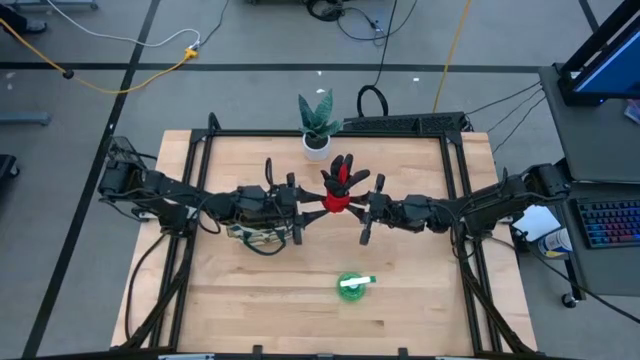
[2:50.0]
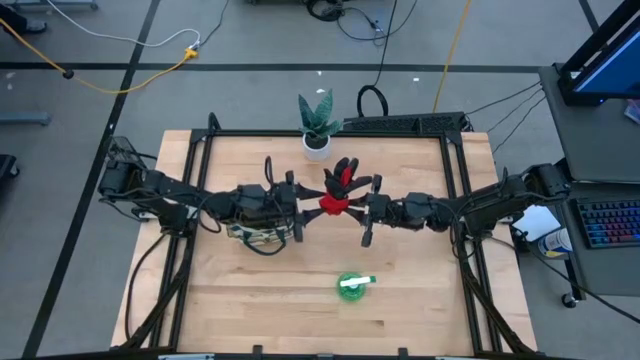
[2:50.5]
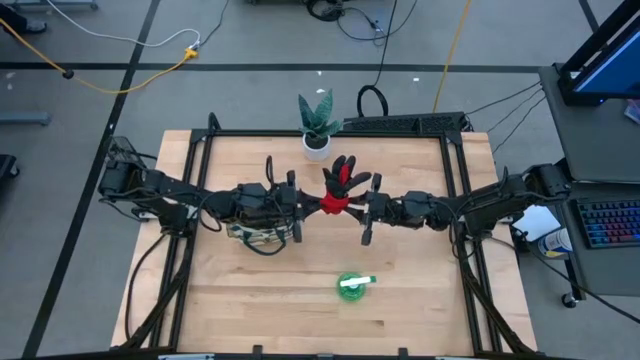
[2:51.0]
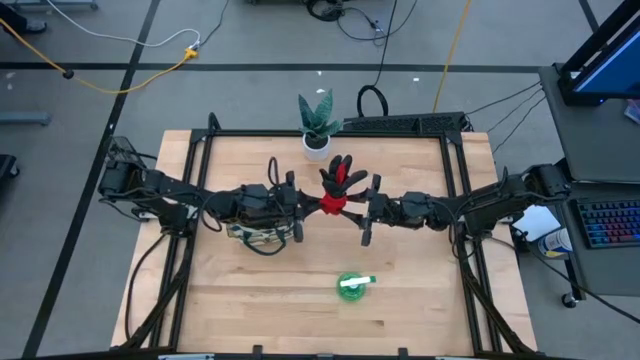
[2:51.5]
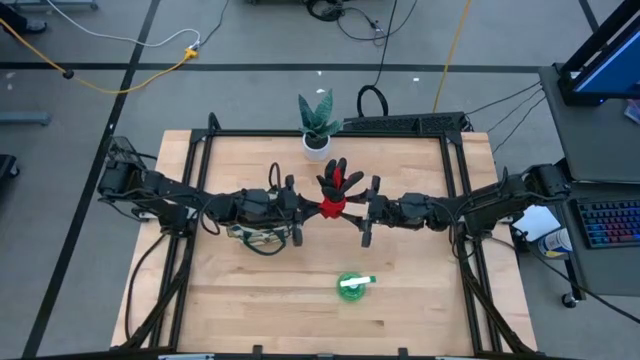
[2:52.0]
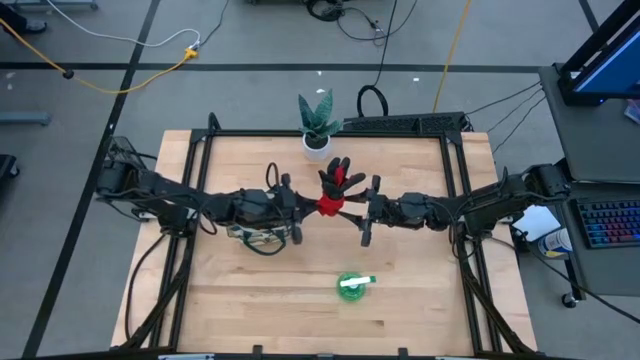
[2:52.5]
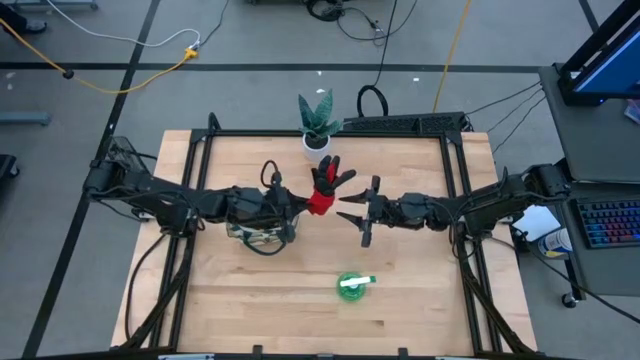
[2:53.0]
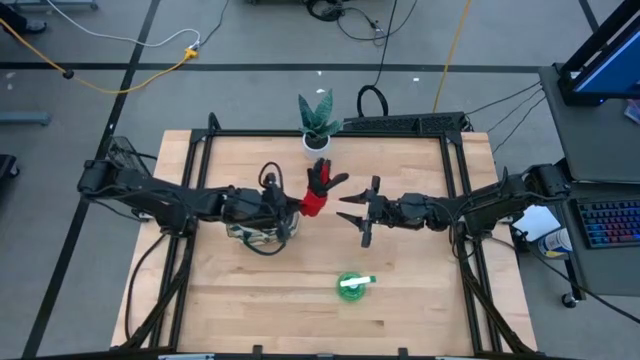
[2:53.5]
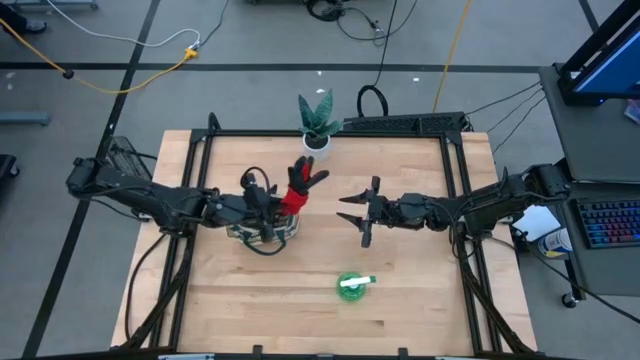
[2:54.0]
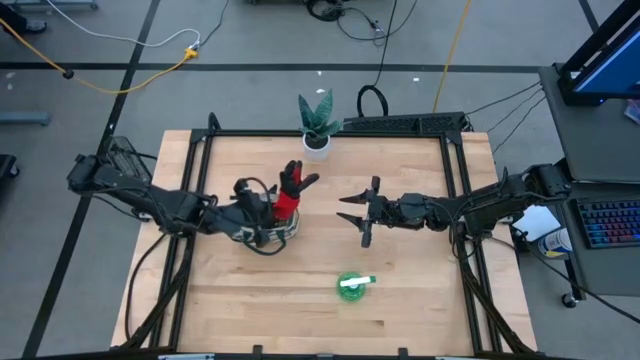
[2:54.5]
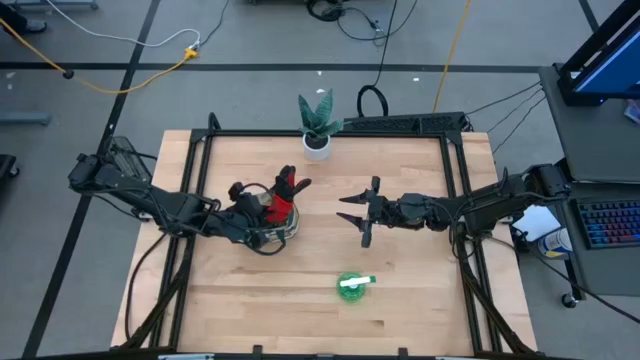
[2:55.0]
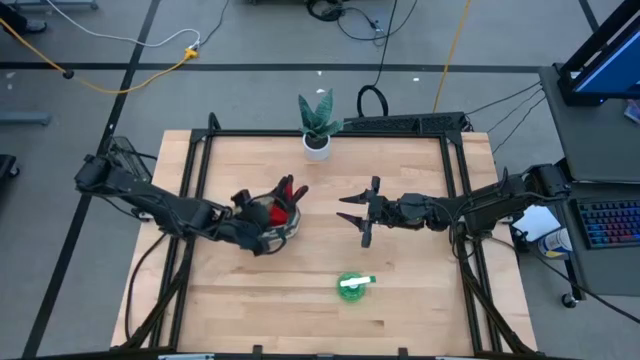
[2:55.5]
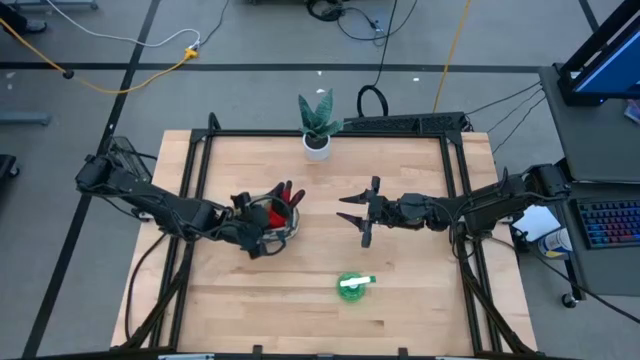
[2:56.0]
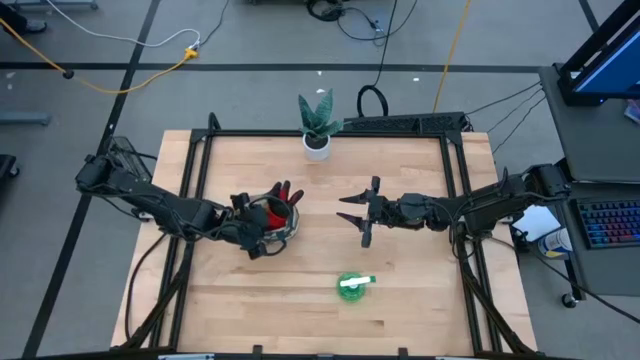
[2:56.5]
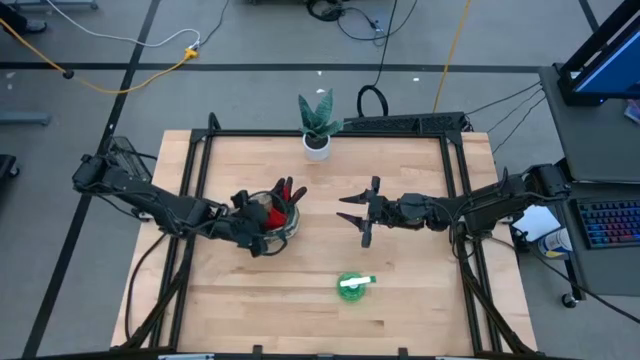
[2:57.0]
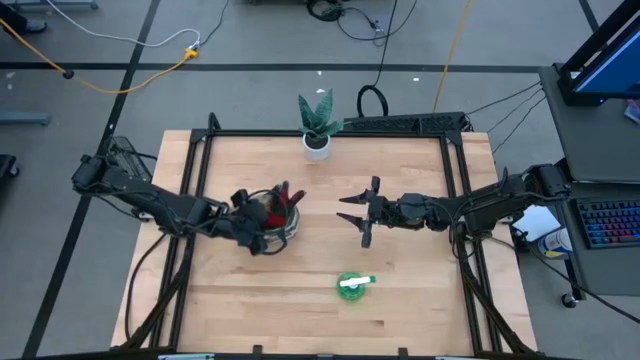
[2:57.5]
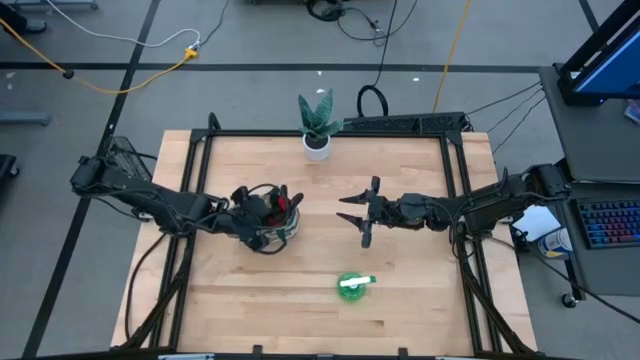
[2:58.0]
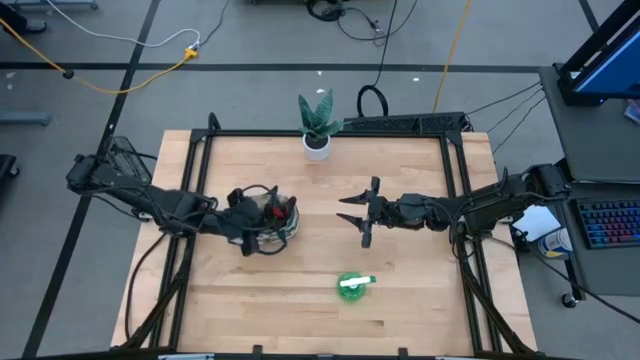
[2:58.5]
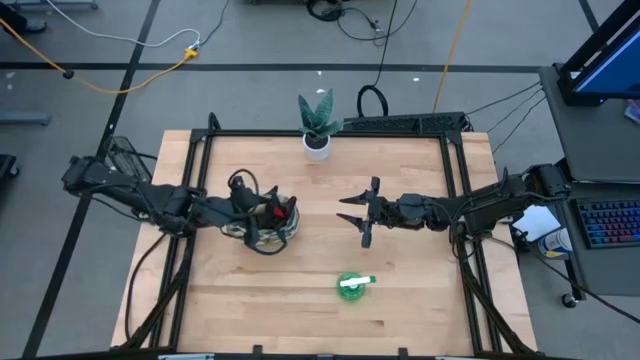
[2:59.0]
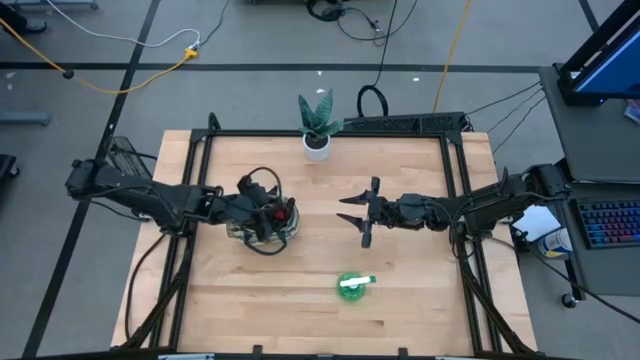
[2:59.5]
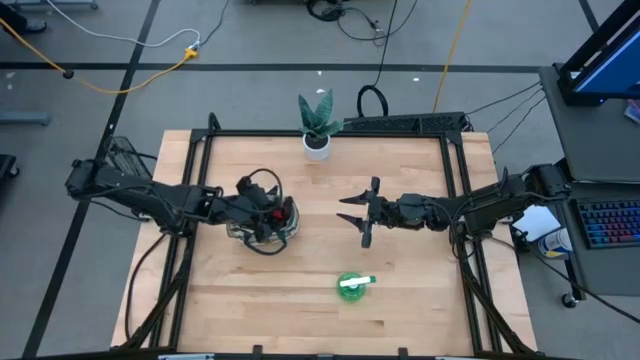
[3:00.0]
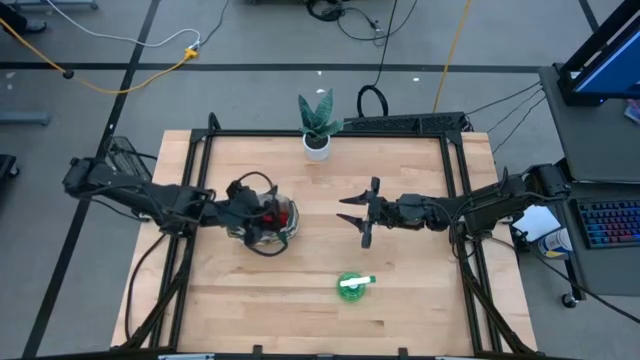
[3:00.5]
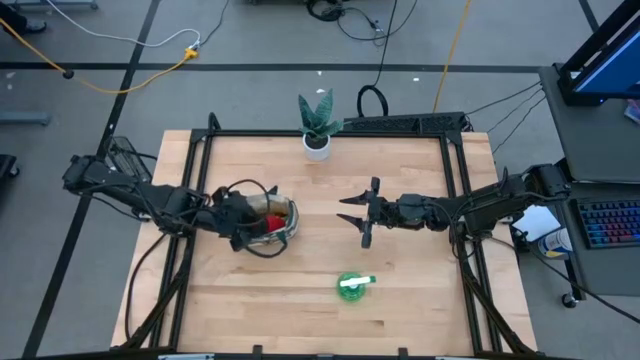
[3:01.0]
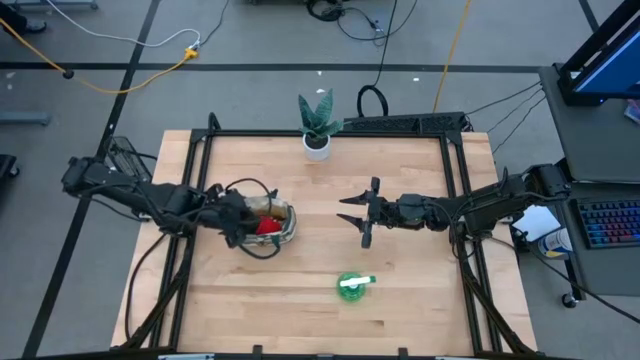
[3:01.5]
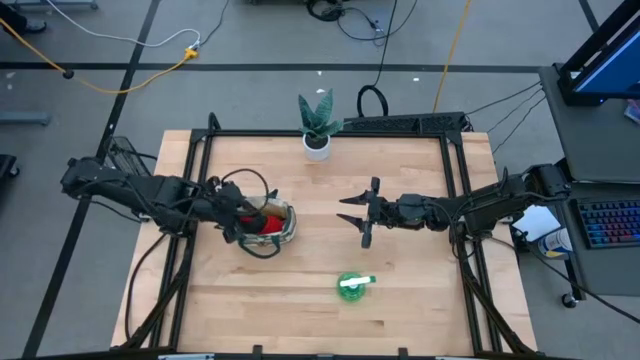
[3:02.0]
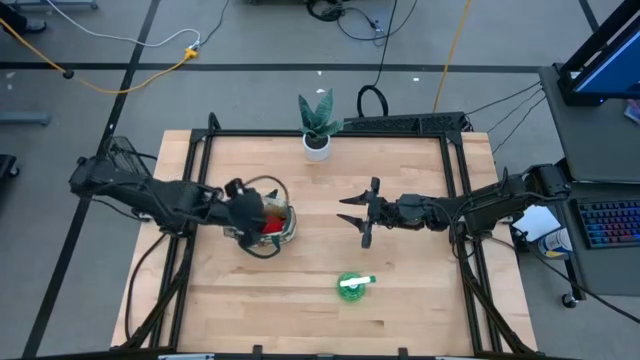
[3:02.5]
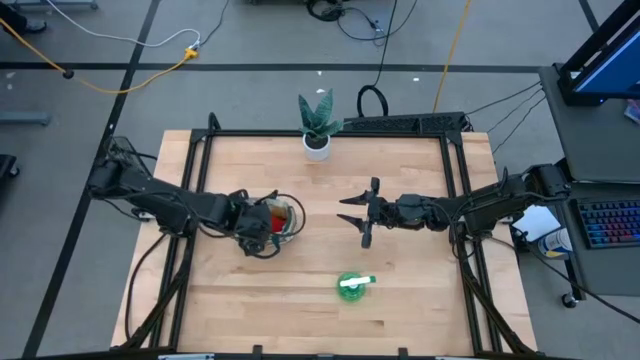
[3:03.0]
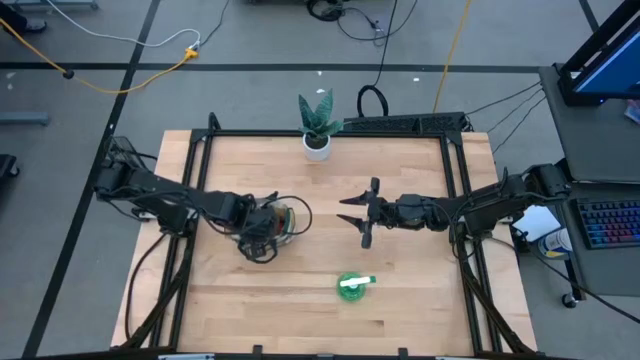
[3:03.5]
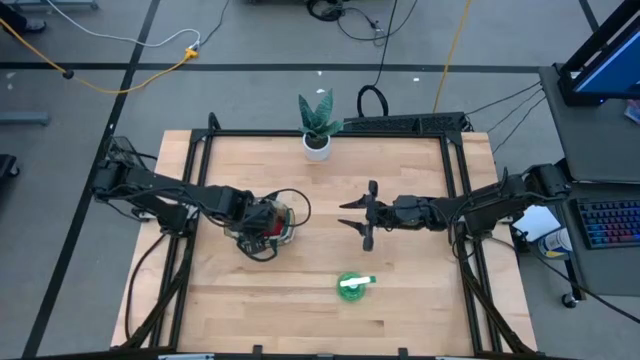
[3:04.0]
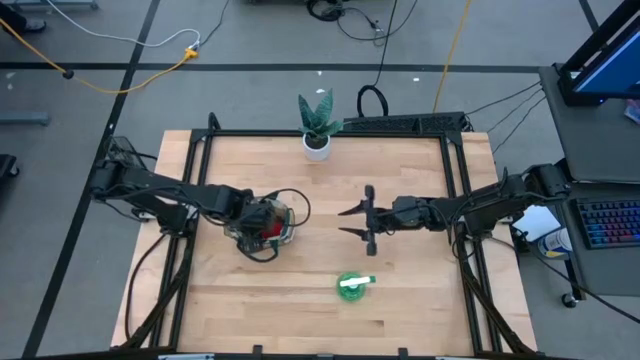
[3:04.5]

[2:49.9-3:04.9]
Task: Pick & Place Garden tools in Gardening bag
Put the red gloves into the white gardening bag

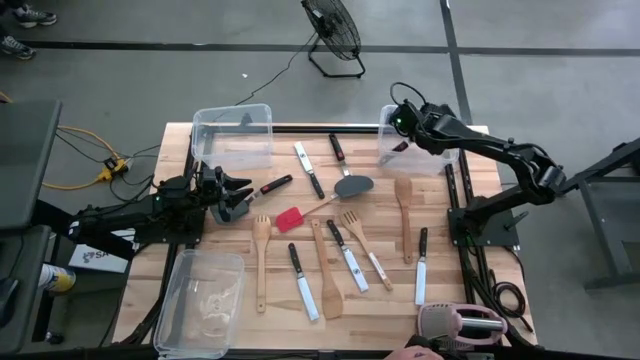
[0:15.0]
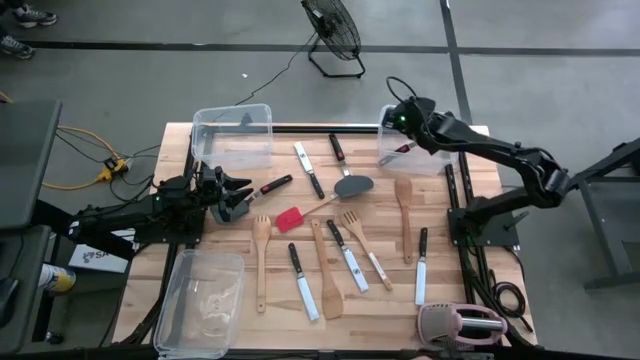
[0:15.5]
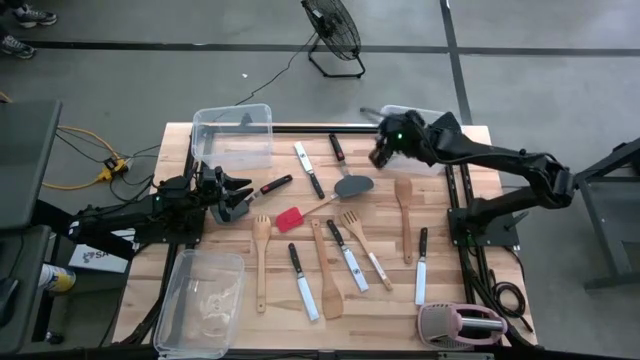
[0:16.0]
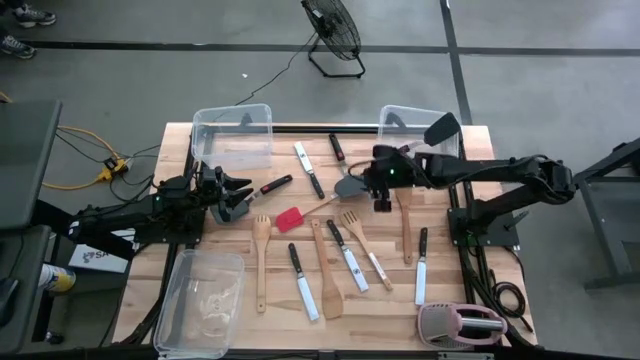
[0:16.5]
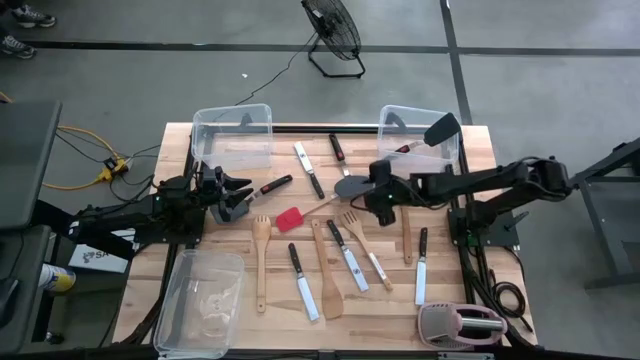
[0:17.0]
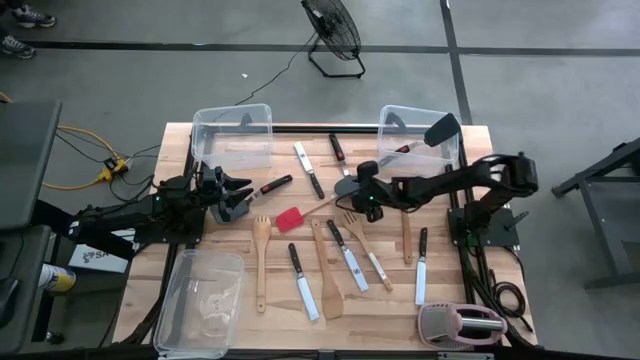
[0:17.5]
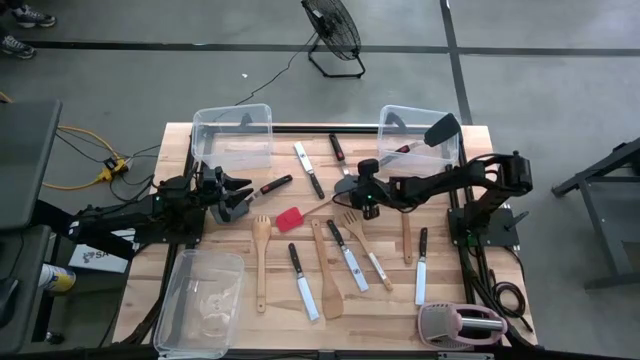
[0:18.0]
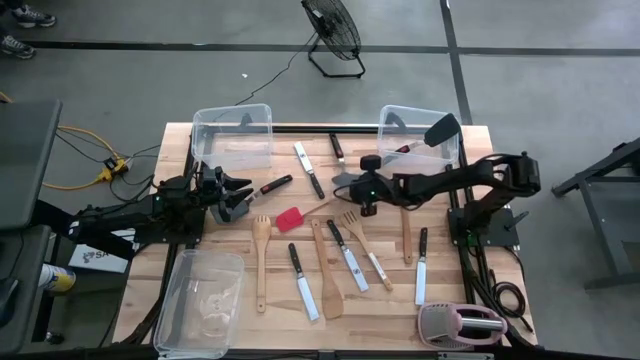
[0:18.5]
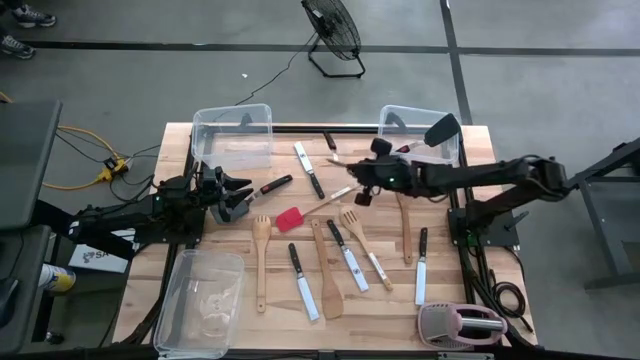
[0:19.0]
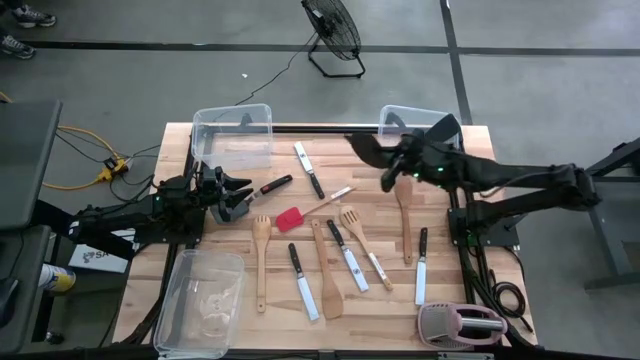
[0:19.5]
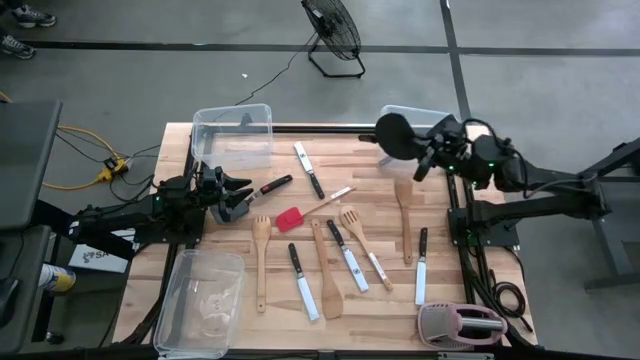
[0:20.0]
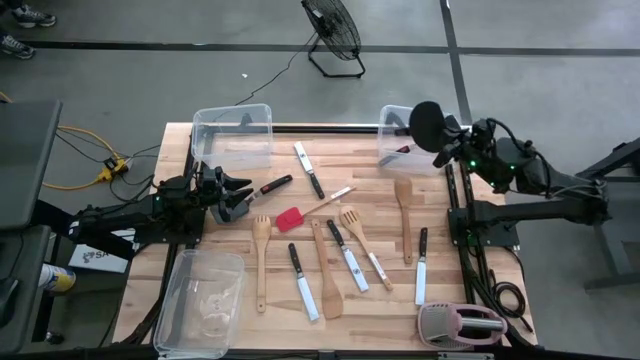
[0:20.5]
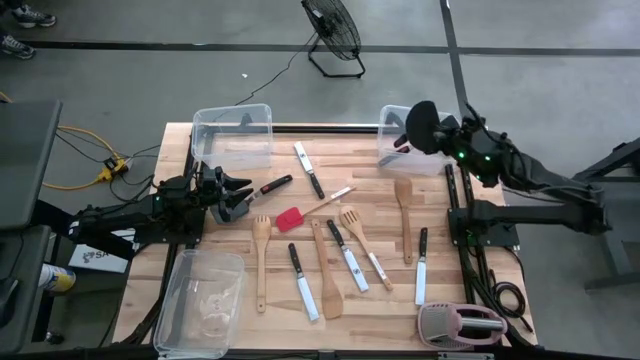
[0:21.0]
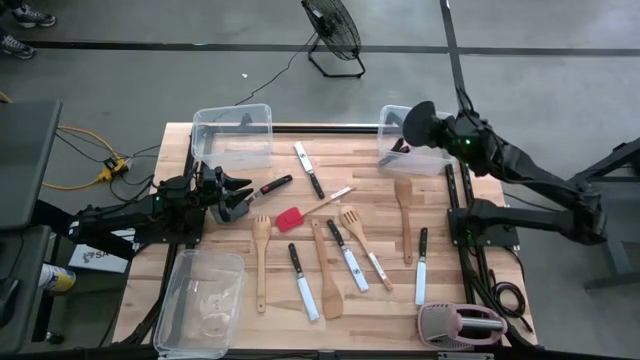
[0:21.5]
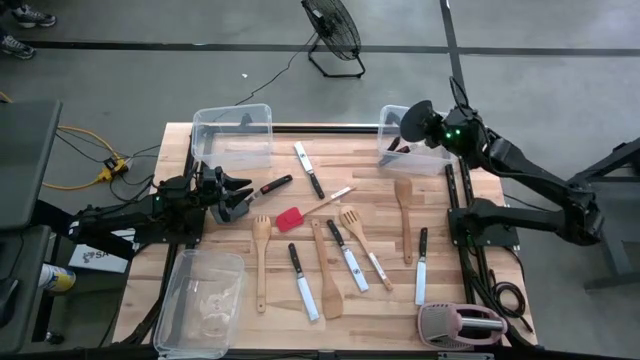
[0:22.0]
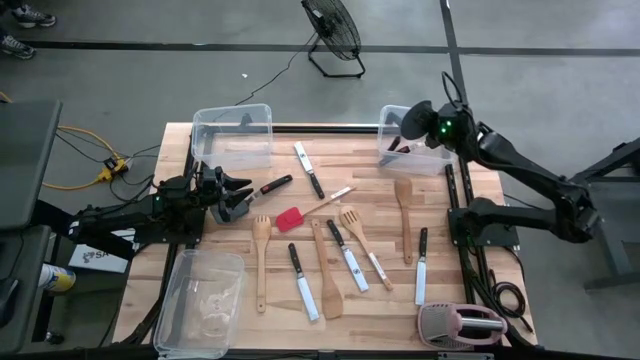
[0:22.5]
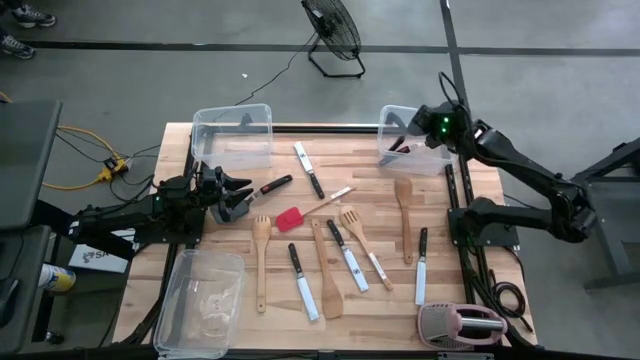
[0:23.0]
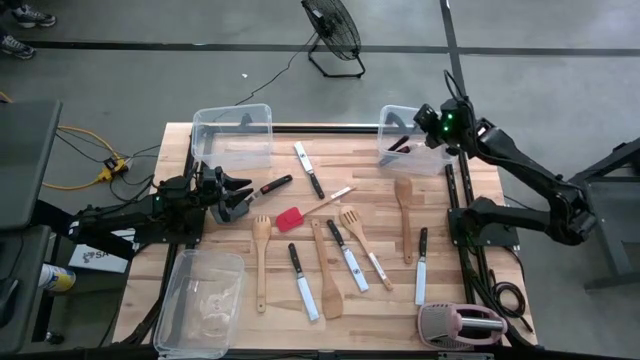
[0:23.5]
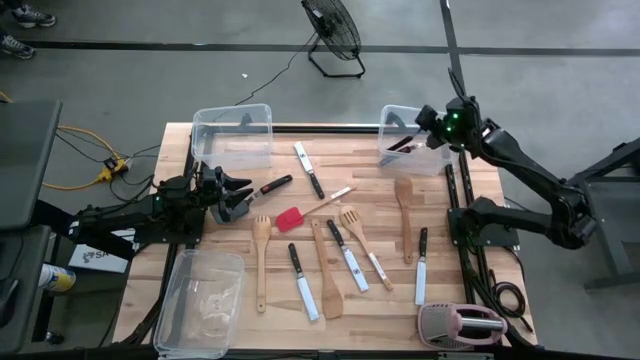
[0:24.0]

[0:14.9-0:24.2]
Task: Pick & Place Kitchen Items
Put the right black spatula into the top right transparent bin
